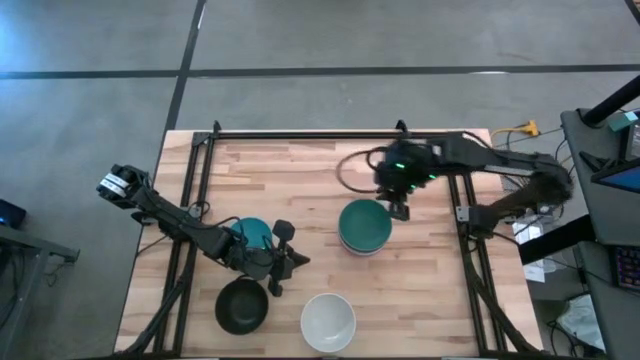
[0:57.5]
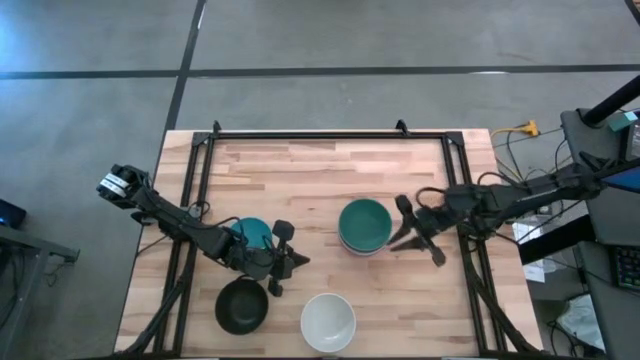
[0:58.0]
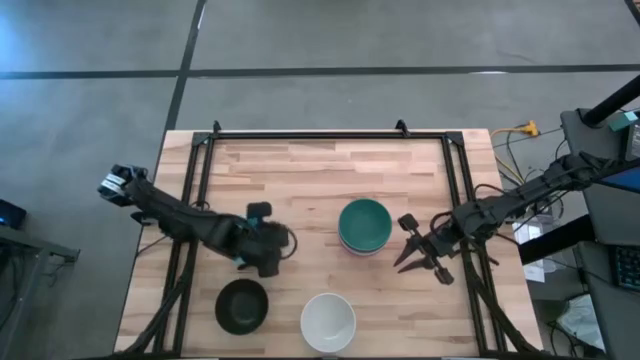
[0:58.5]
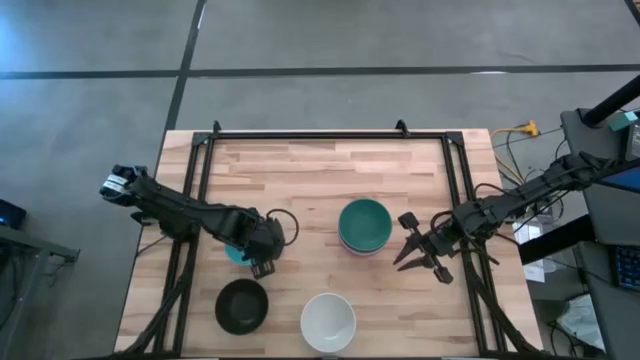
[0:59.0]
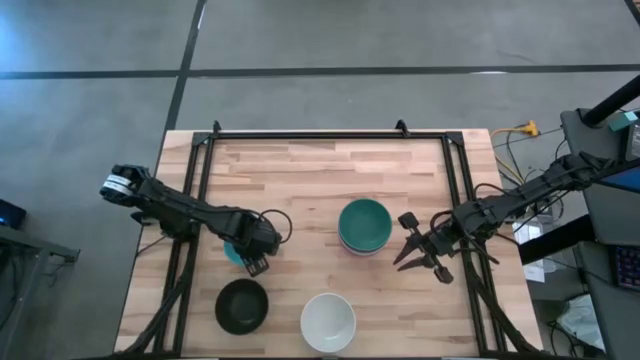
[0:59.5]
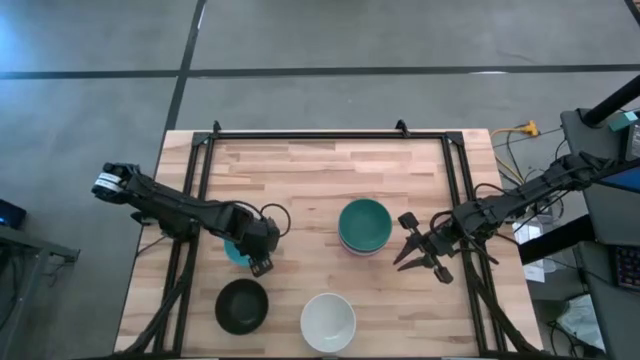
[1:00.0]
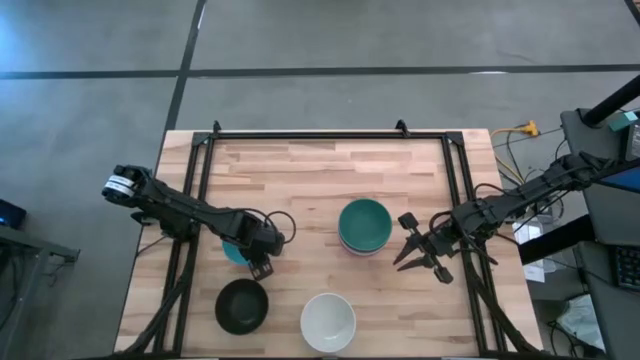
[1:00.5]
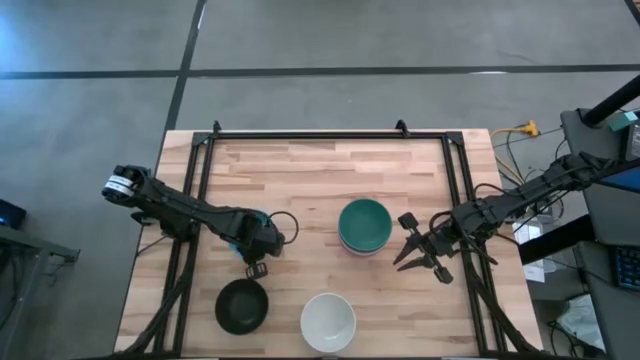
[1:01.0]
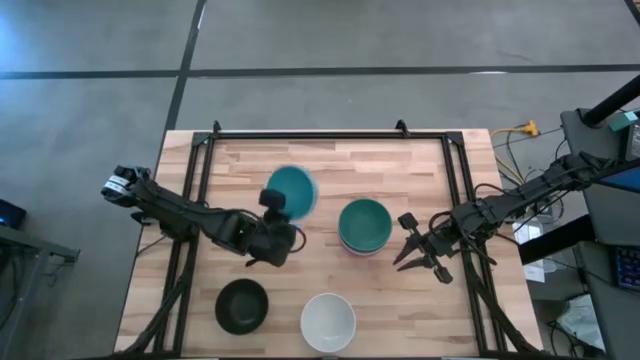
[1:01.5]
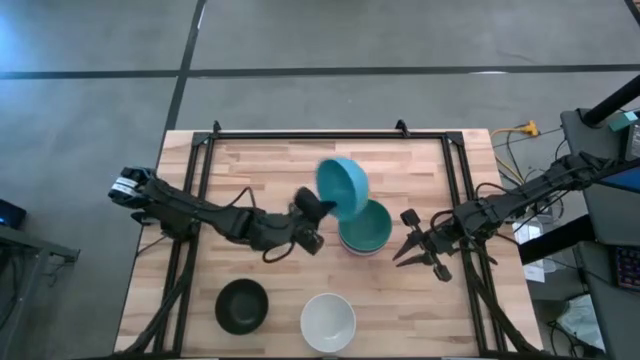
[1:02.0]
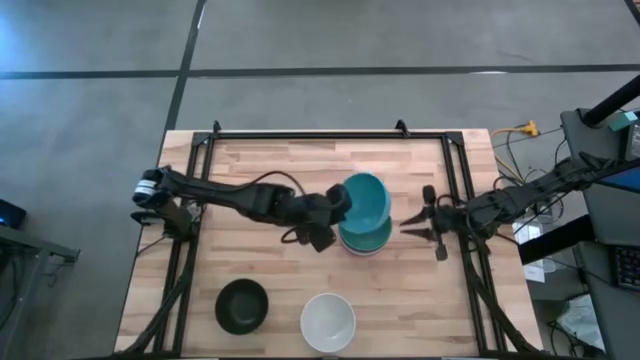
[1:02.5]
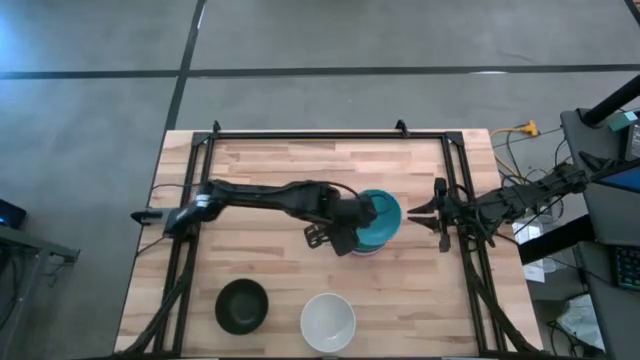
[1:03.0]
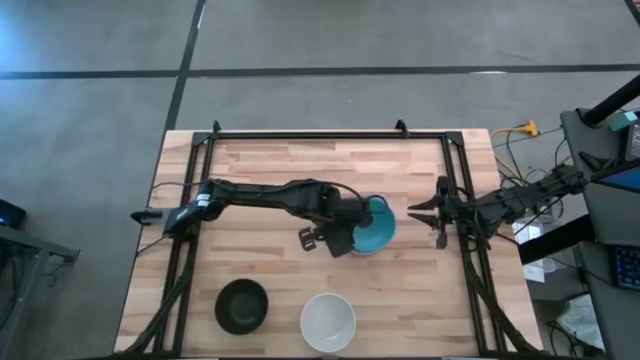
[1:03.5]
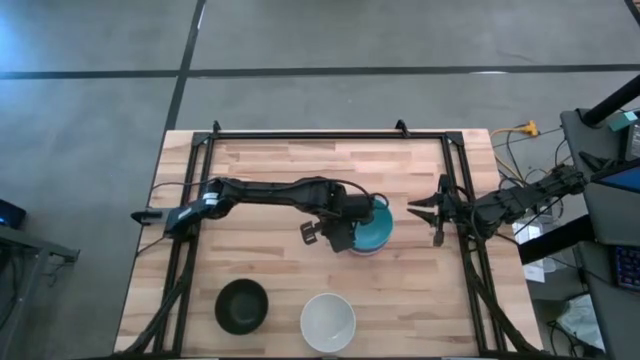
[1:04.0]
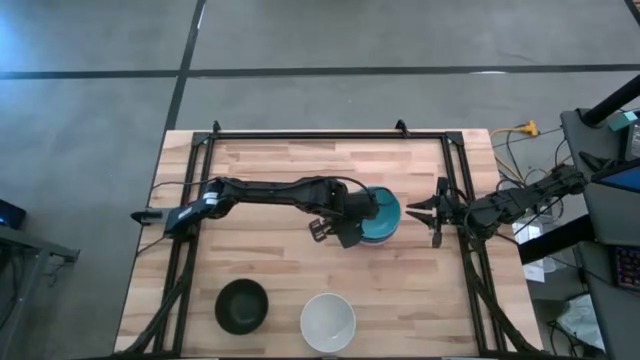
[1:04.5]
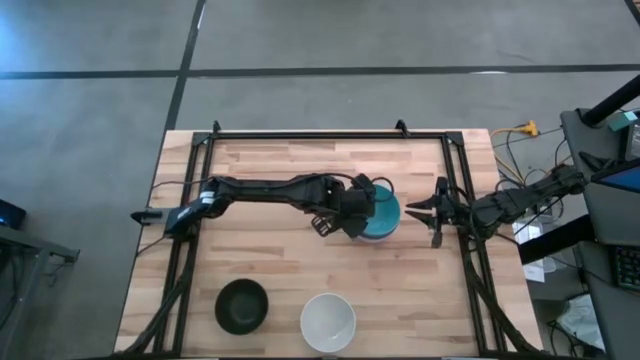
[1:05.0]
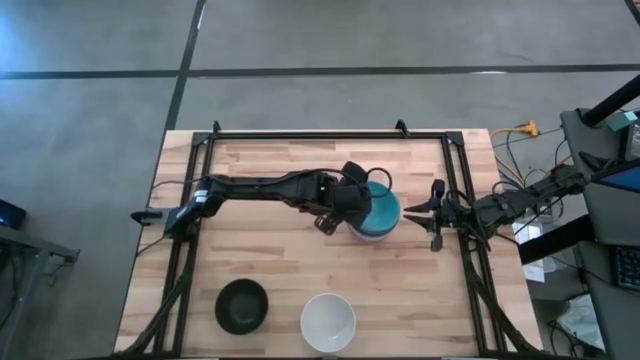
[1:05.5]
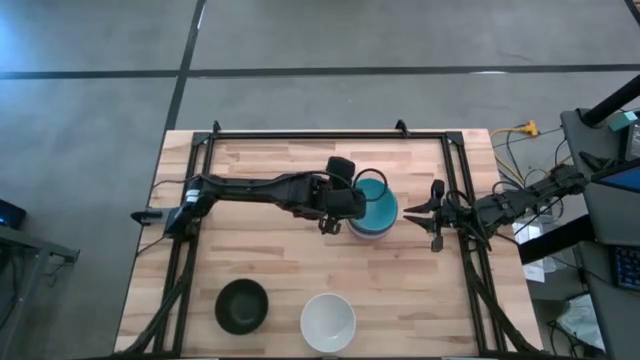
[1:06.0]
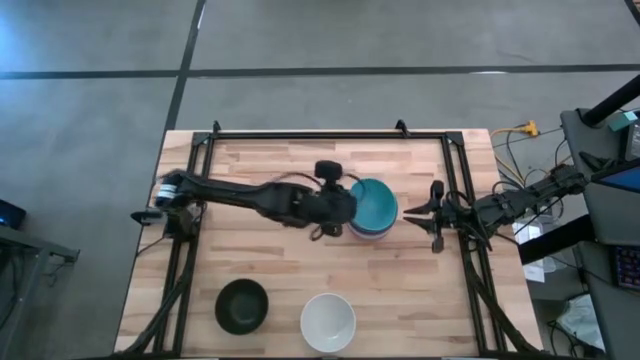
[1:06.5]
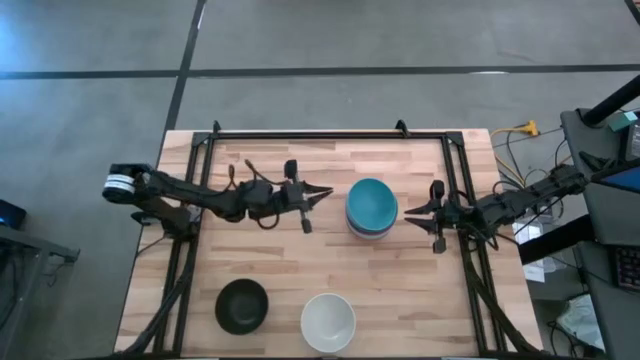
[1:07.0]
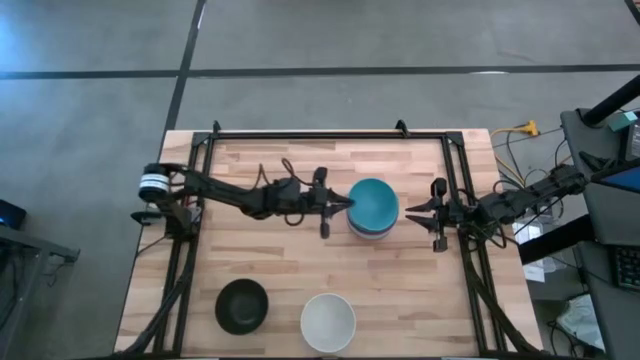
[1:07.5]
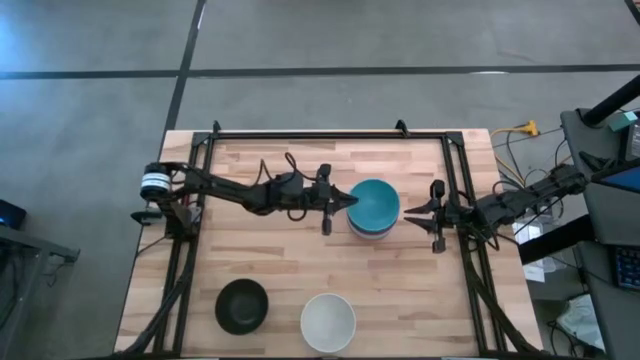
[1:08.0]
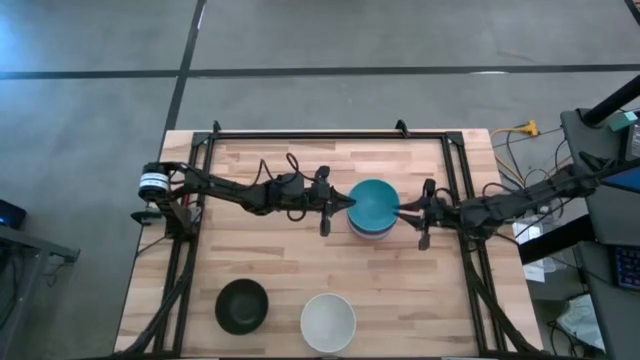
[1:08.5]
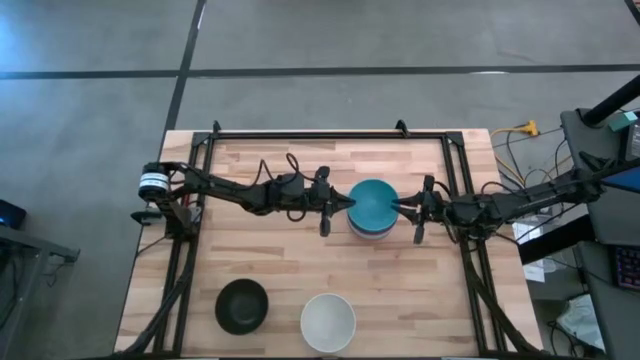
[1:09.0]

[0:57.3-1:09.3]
Task: Nest bowls inside each other
Stack the blue bowl on the green bowl

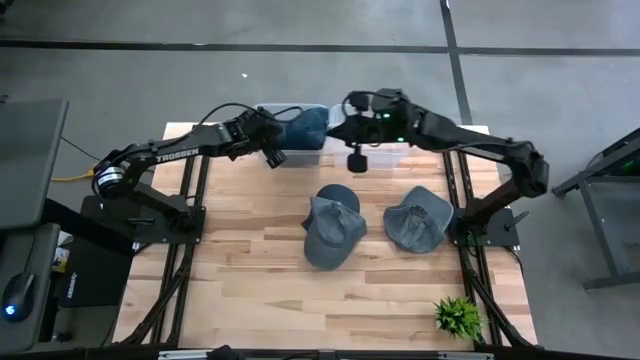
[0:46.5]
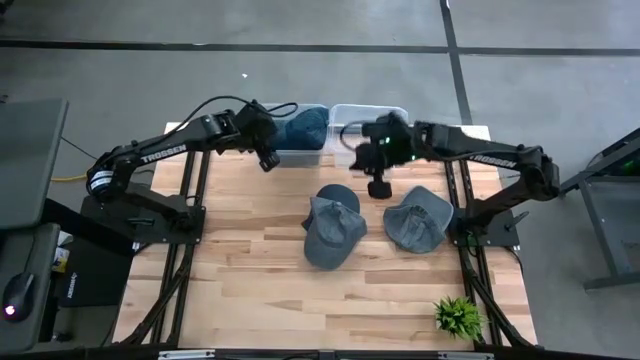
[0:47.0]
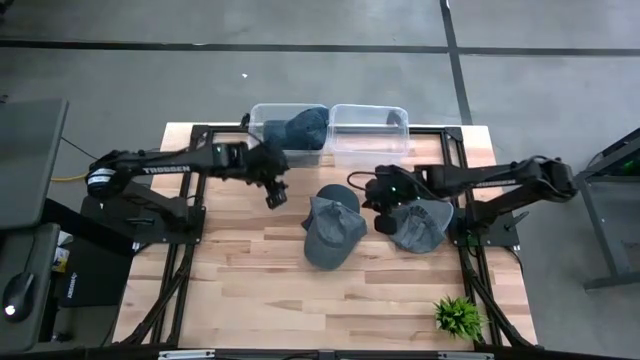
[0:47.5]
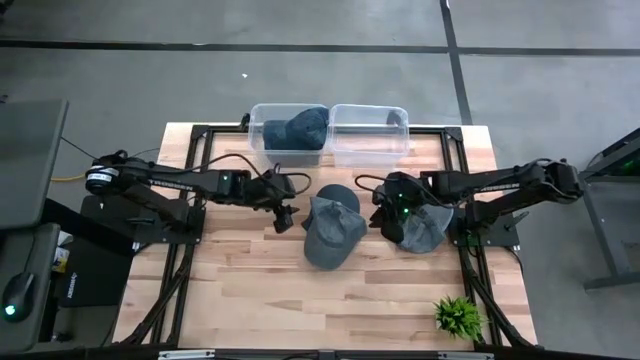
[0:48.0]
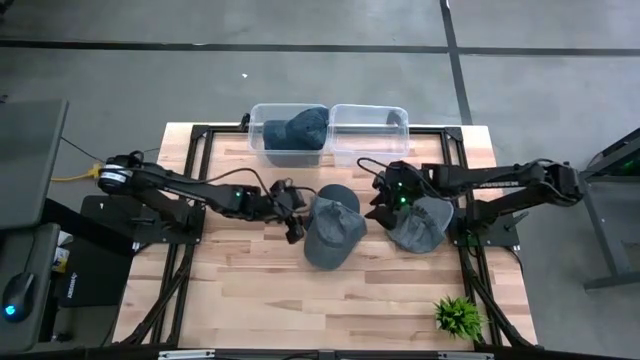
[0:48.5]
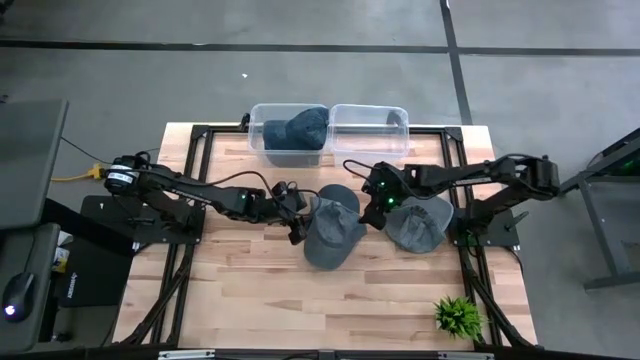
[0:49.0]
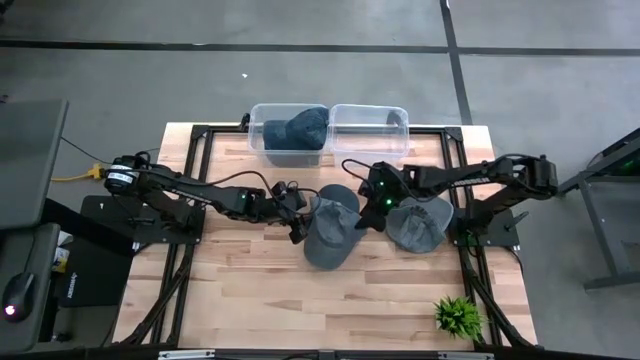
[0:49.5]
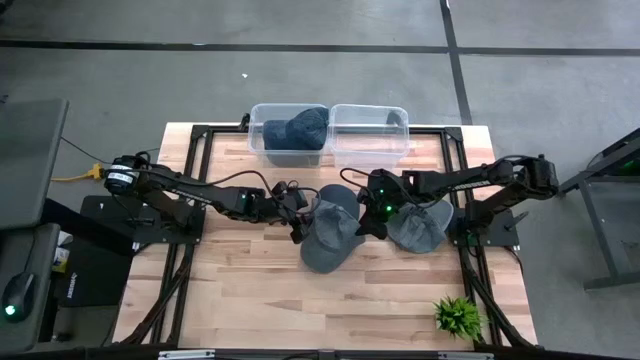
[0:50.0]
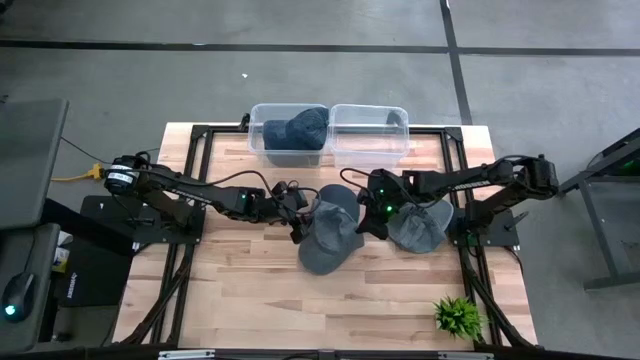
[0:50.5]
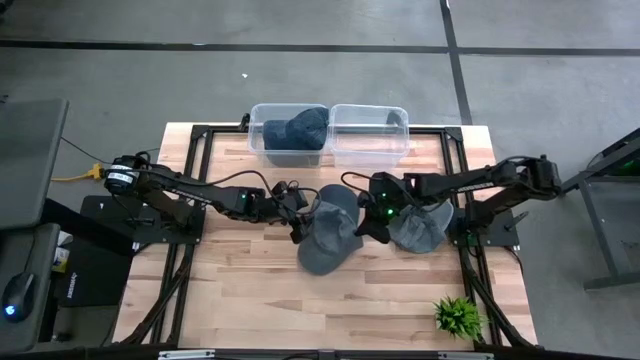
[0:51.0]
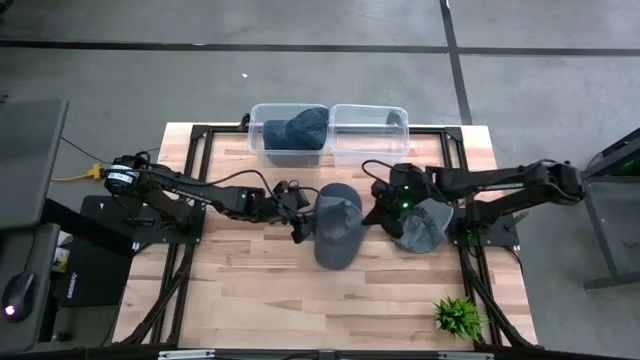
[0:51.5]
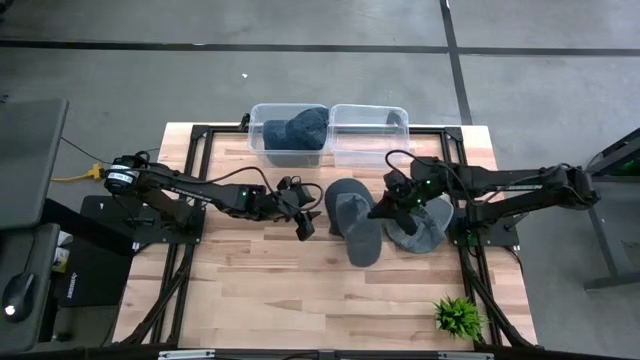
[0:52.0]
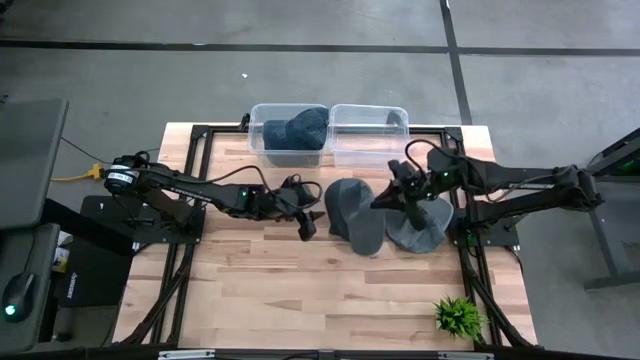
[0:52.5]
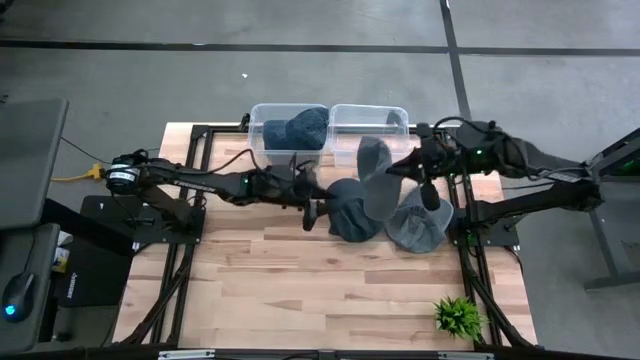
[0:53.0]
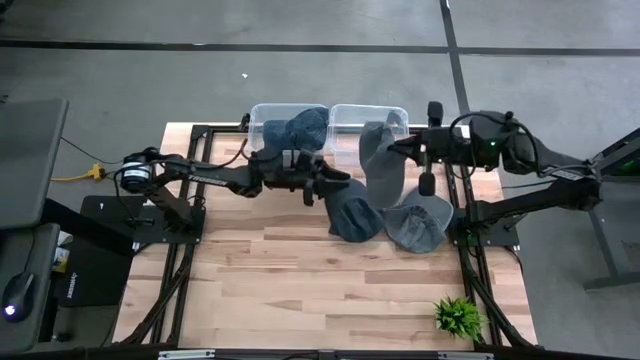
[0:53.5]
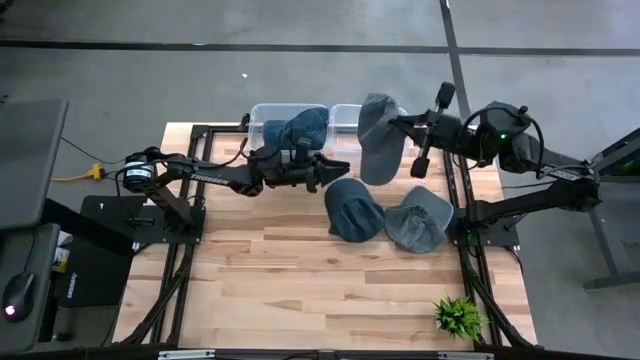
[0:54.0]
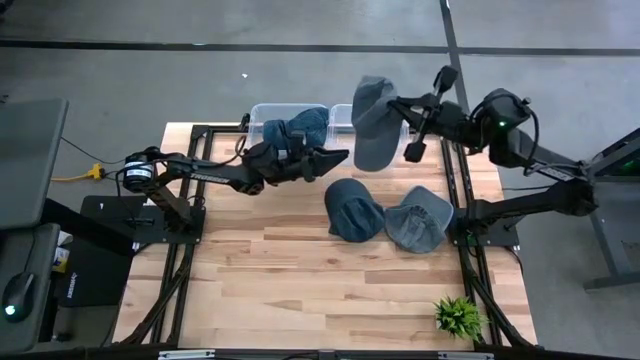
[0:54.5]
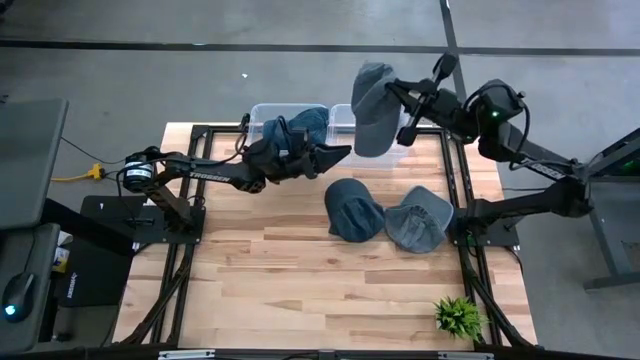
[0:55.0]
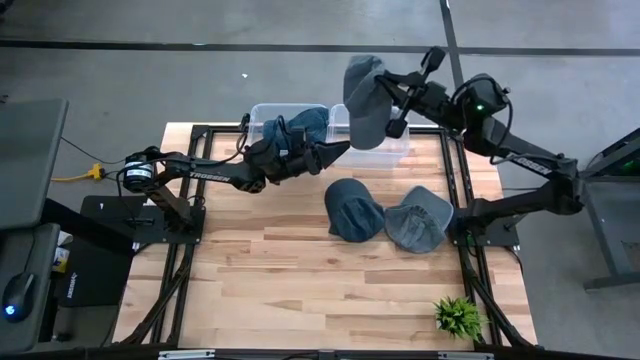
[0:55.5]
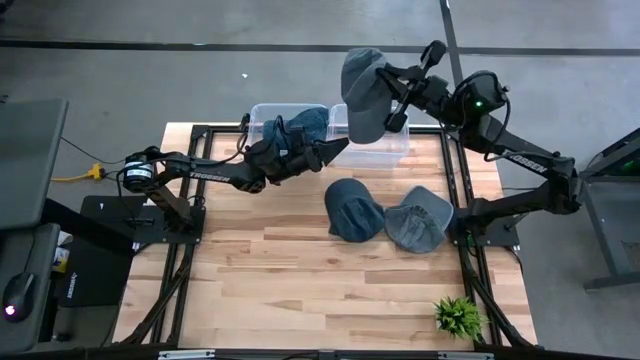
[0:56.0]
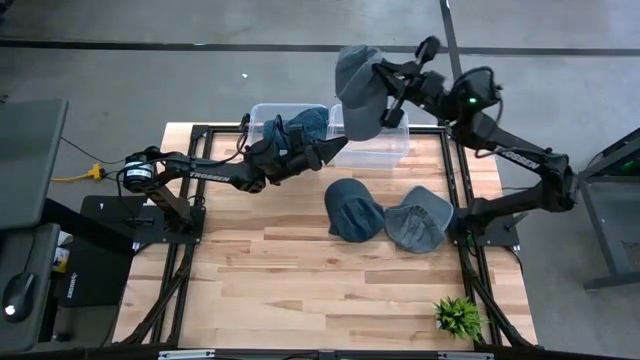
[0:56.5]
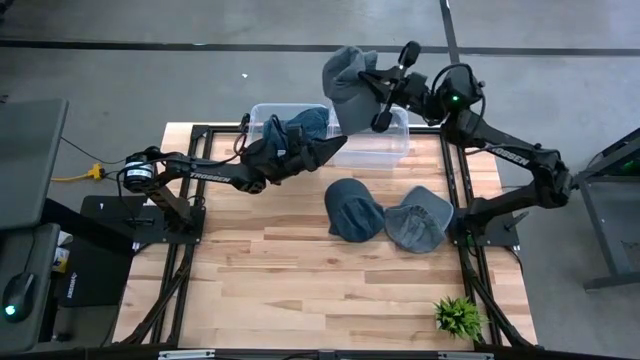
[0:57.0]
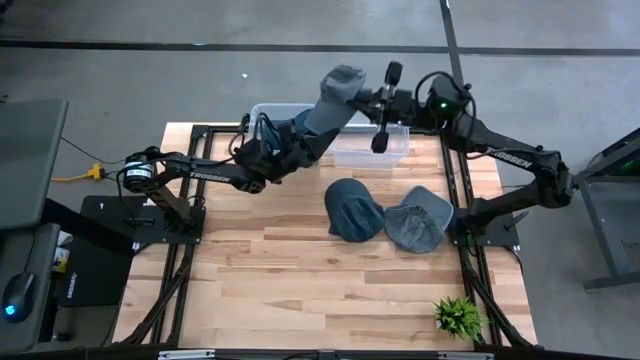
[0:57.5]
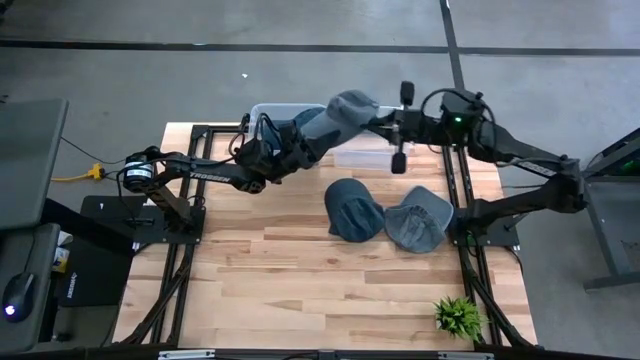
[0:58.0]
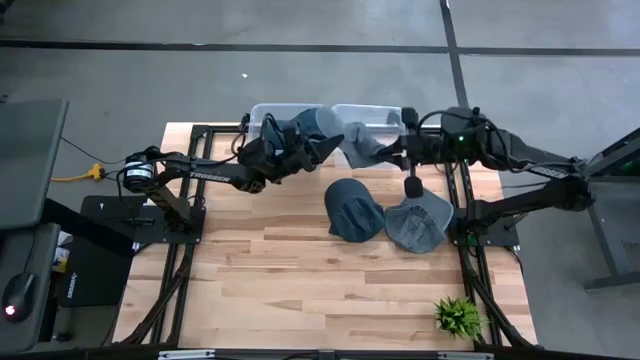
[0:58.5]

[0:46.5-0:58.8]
Task: Pick and place caps into container
Put the left gray cap into the right transparent container
